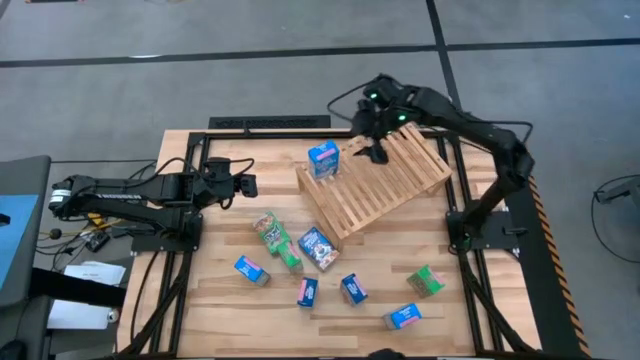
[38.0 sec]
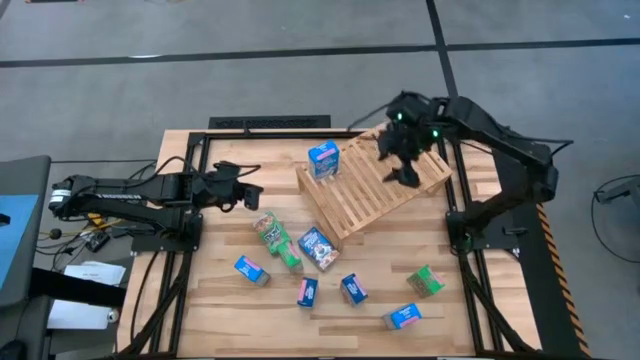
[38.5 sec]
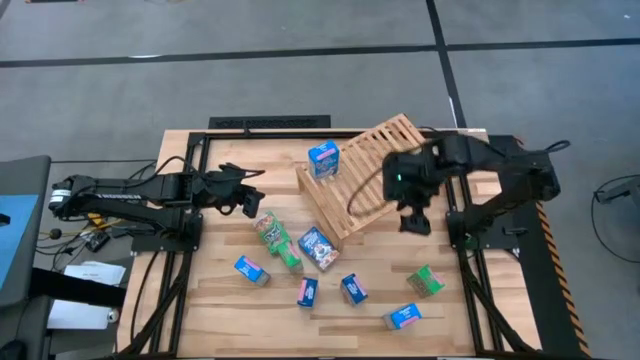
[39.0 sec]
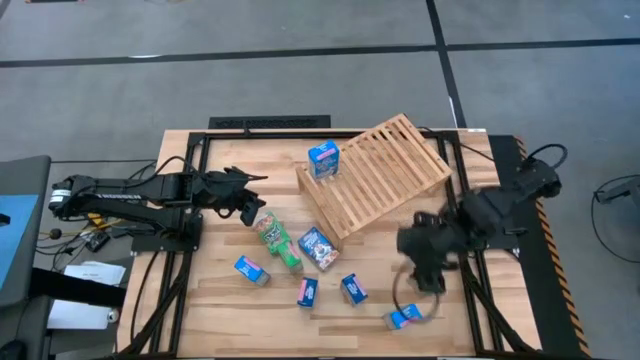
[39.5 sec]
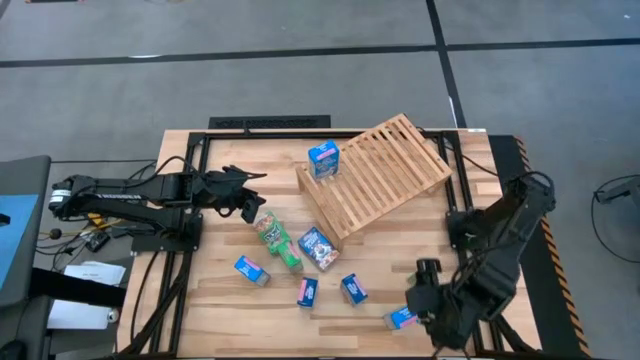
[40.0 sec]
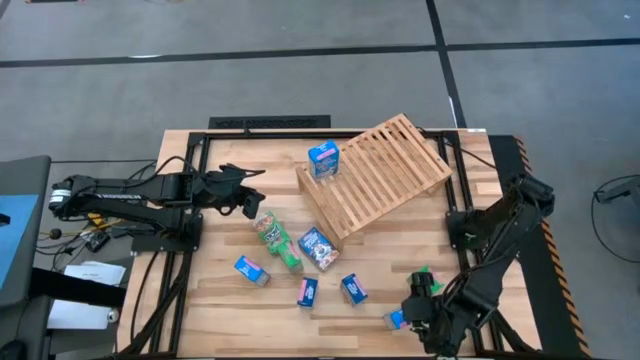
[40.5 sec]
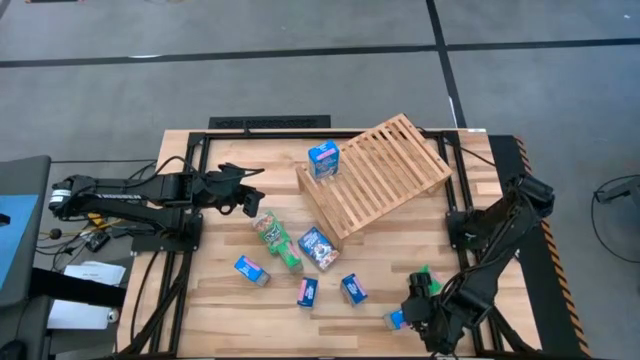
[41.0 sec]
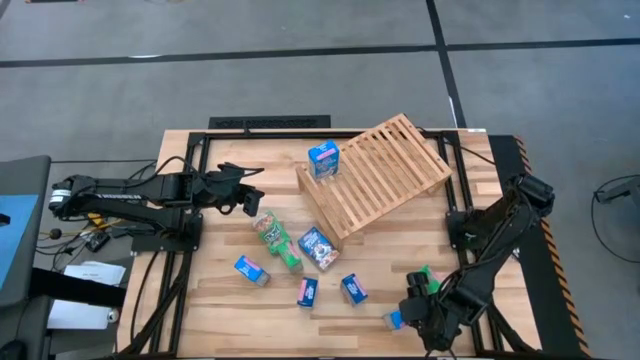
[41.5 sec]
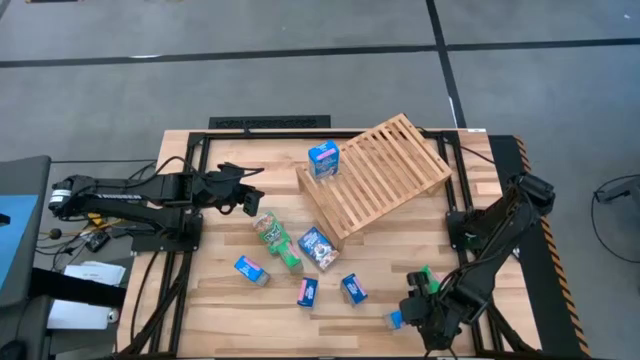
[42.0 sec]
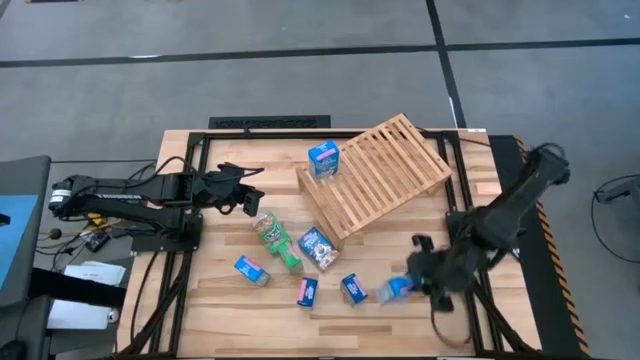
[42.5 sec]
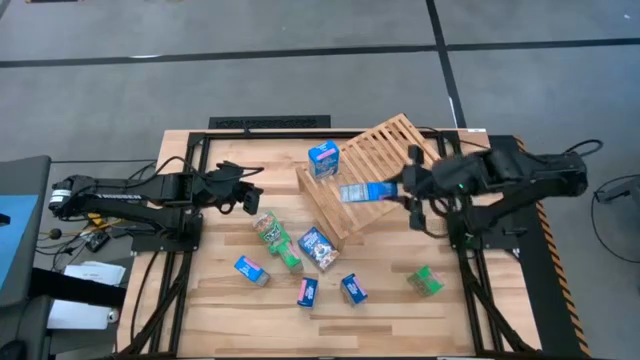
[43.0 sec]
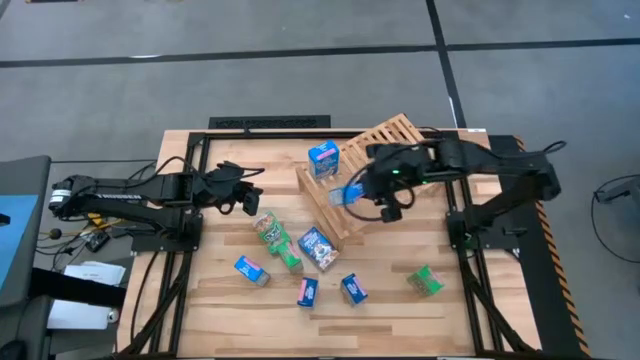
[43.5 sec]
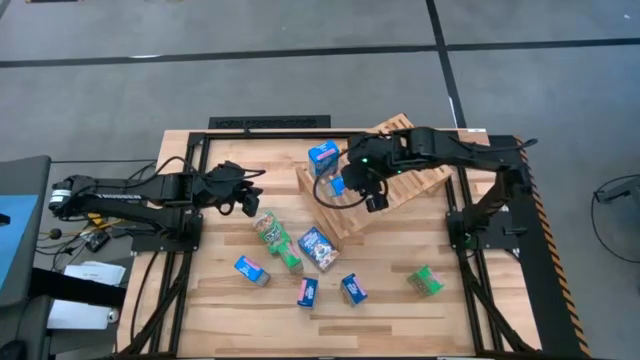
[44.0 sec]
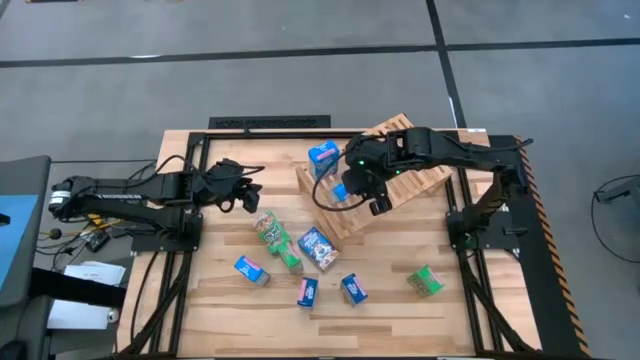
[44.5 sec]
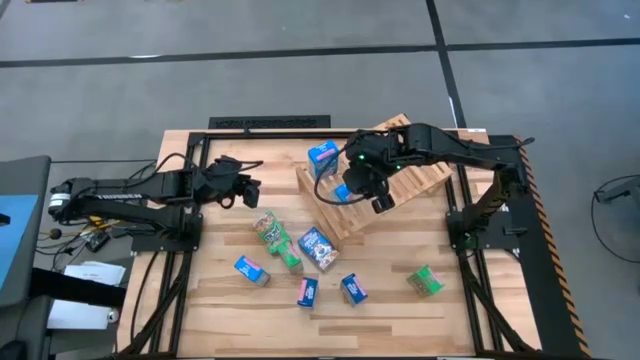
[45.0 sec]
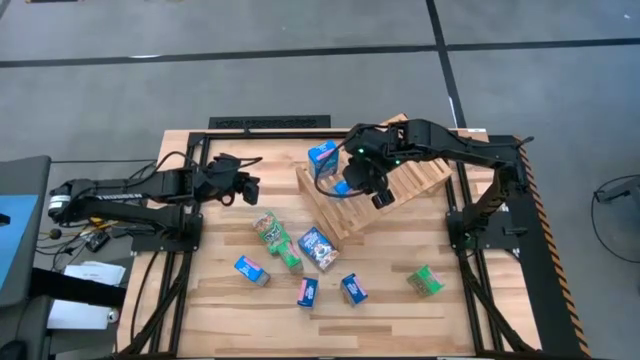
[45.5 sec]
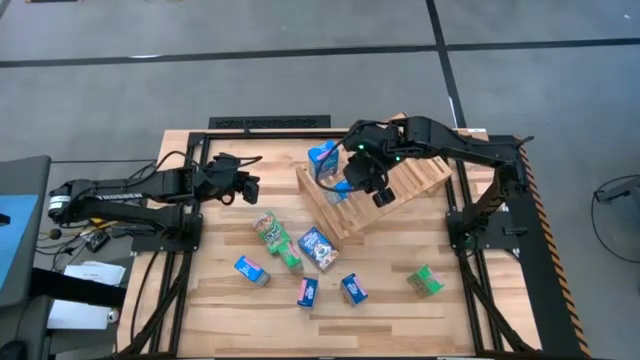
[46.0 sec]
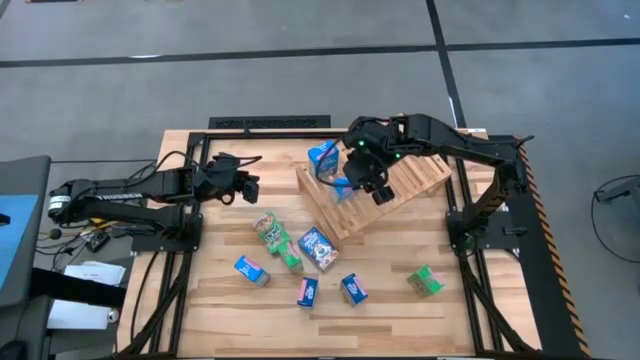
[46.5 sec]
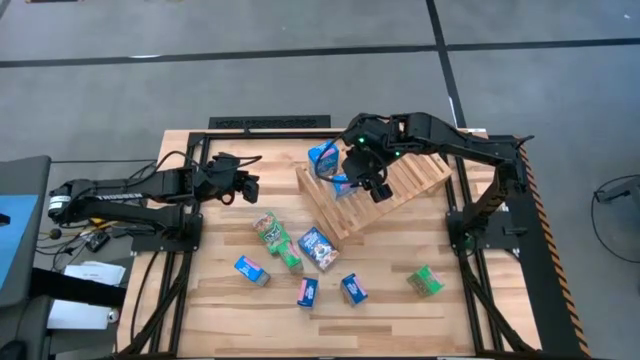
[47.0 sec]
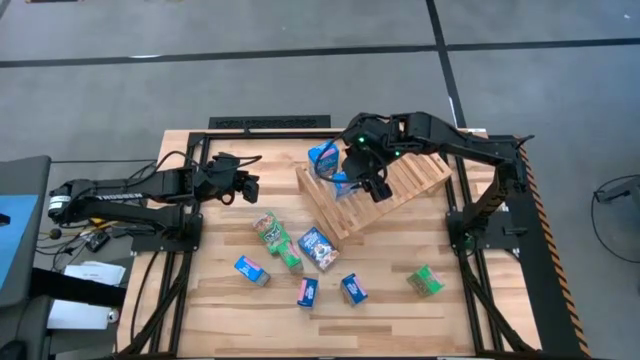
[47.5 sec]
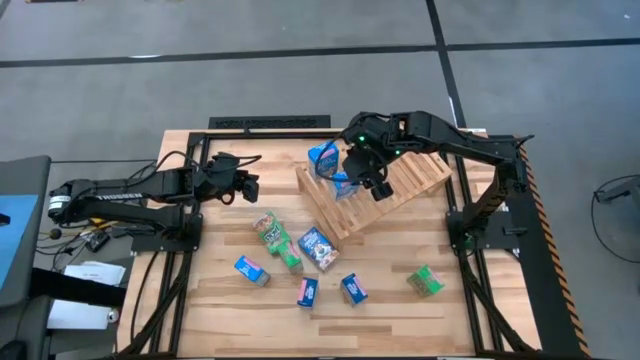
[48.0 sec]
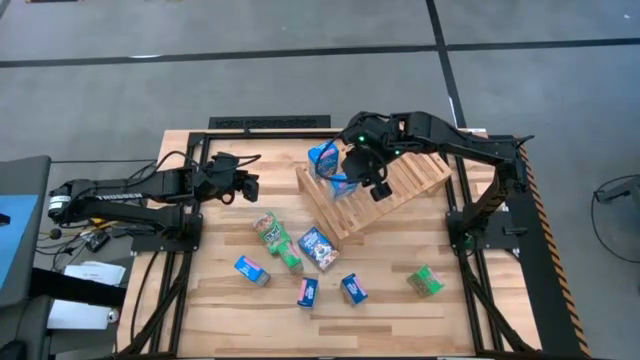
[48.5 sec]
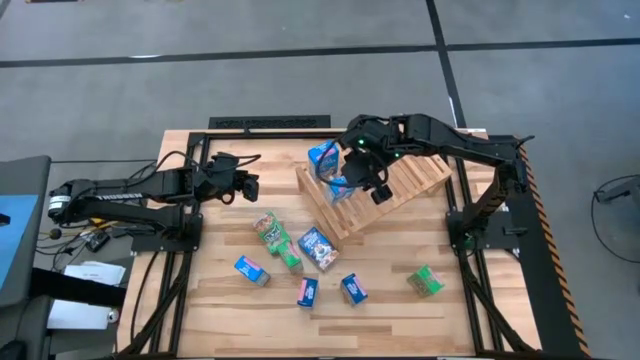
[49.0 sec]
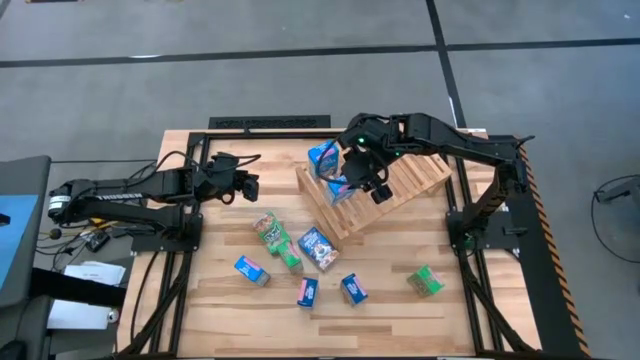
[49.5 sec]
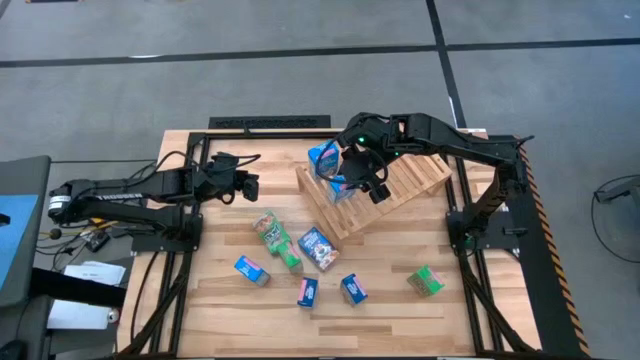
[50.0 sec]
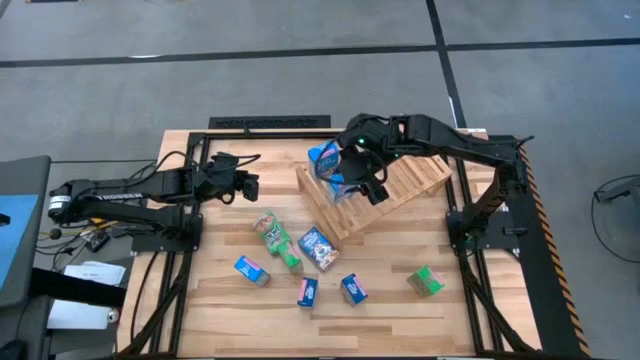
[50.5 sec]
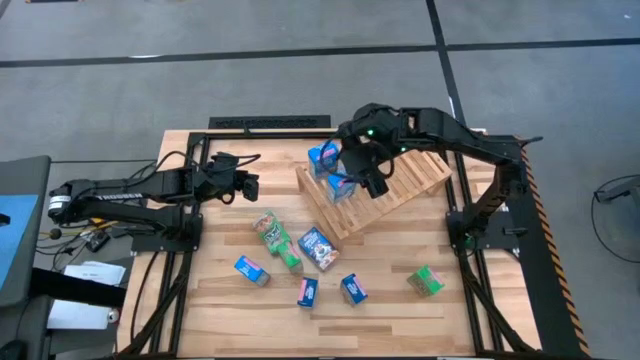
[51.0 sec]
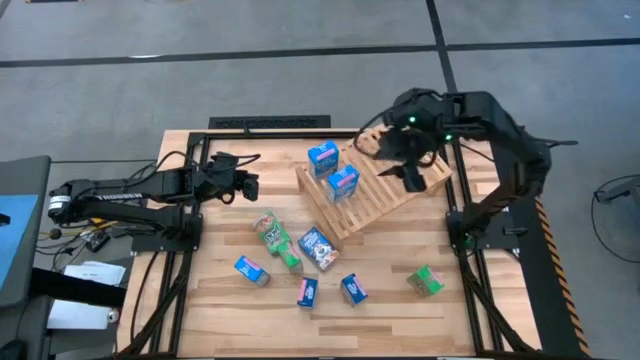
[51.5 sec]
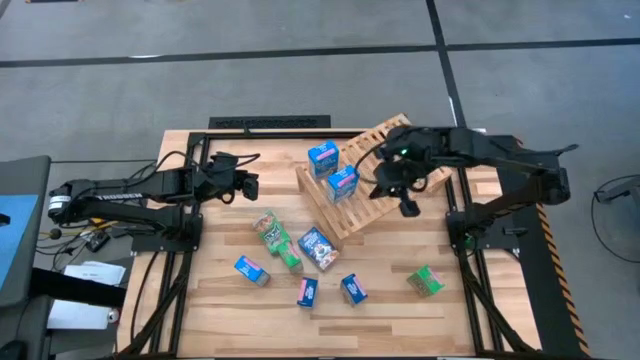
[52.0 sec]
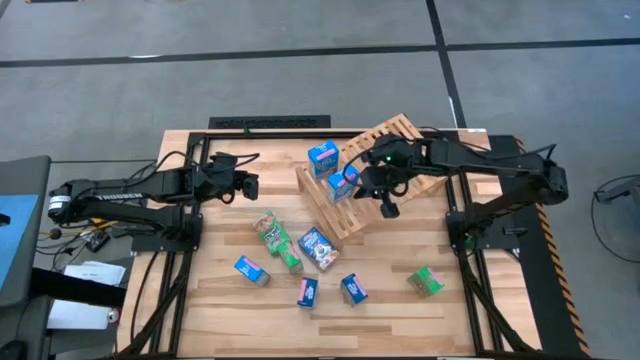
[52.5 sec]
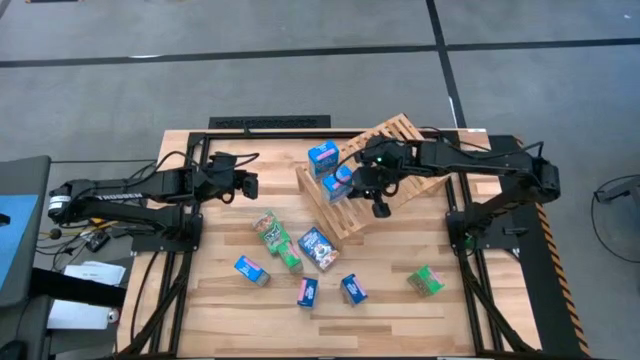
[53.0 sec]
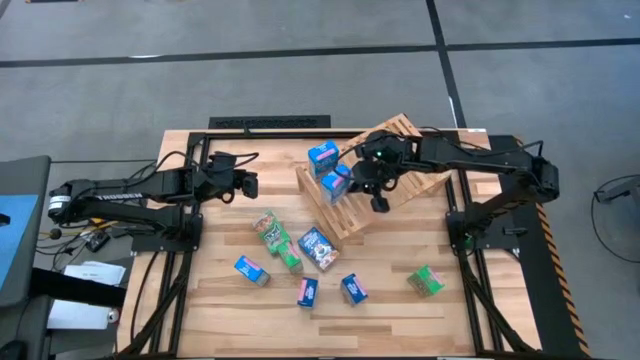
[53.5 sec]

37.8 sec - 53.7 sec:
Task: Stack cereal on shelf
Put the right light blue cereal box aligned with the other light blue cereal box on the shelf

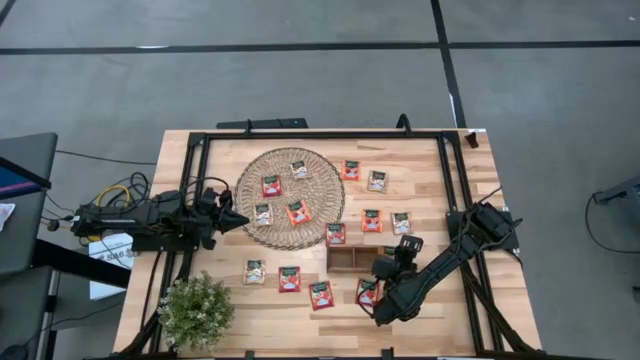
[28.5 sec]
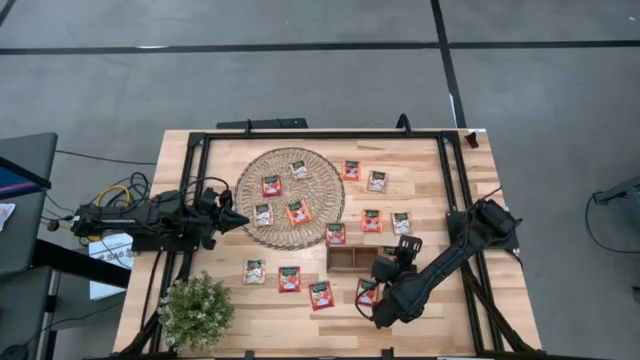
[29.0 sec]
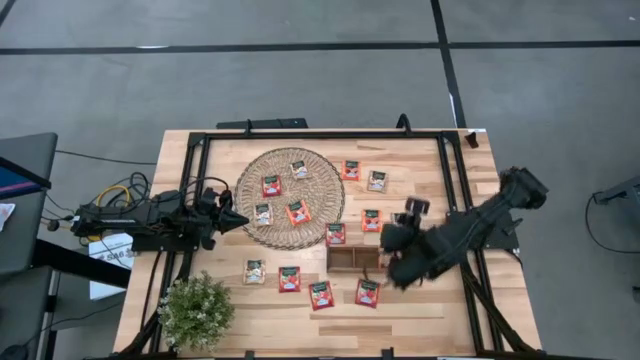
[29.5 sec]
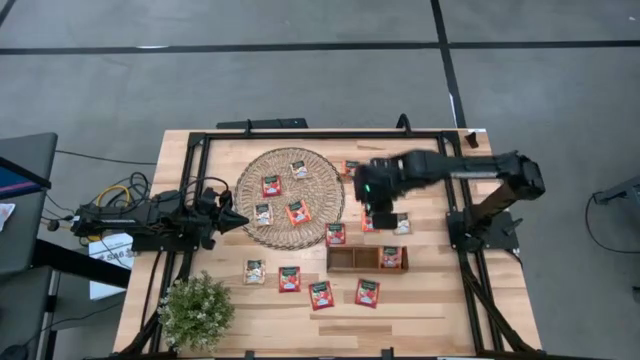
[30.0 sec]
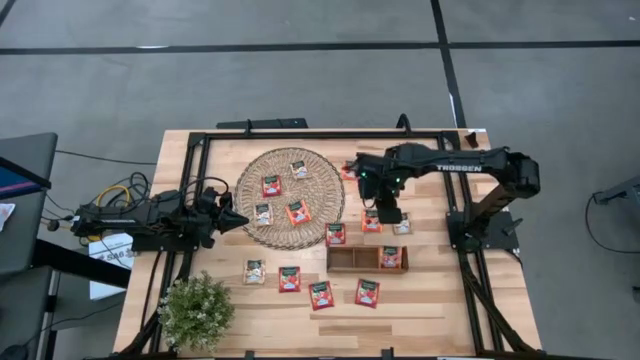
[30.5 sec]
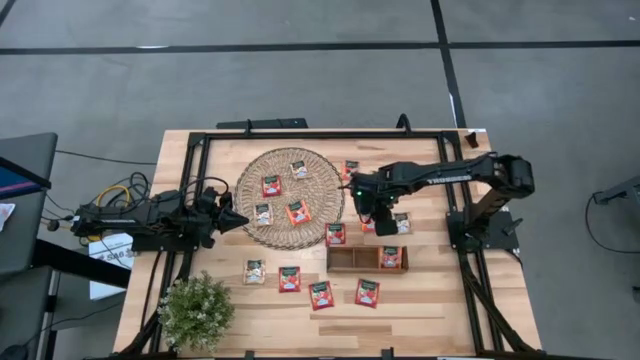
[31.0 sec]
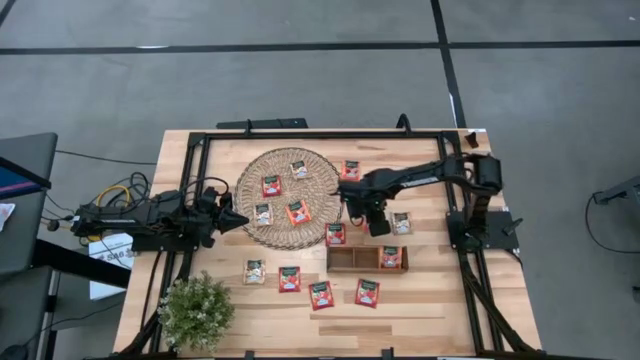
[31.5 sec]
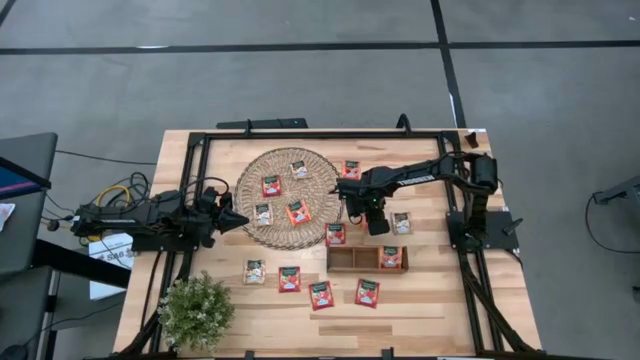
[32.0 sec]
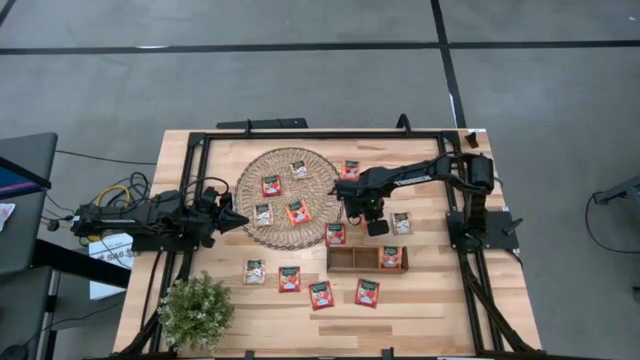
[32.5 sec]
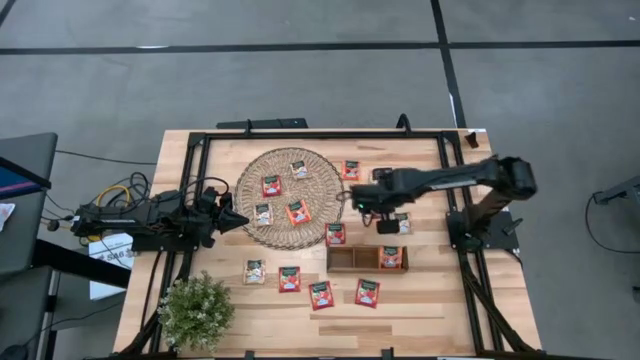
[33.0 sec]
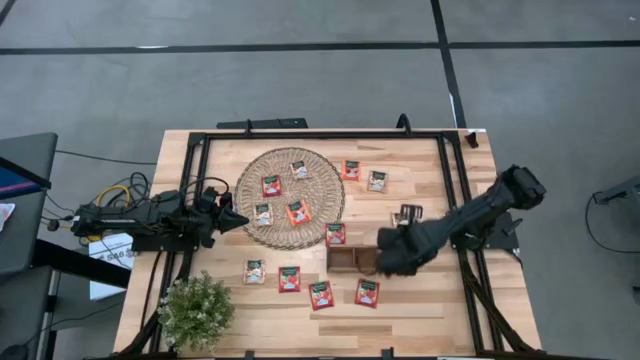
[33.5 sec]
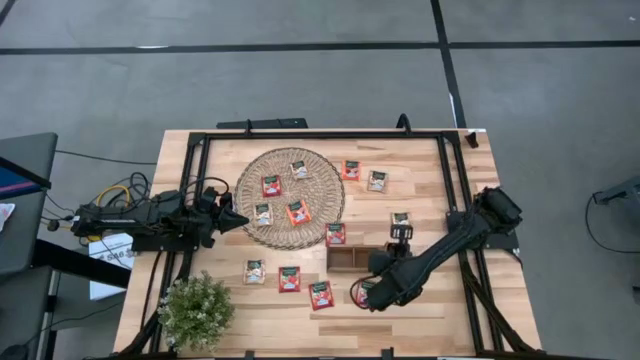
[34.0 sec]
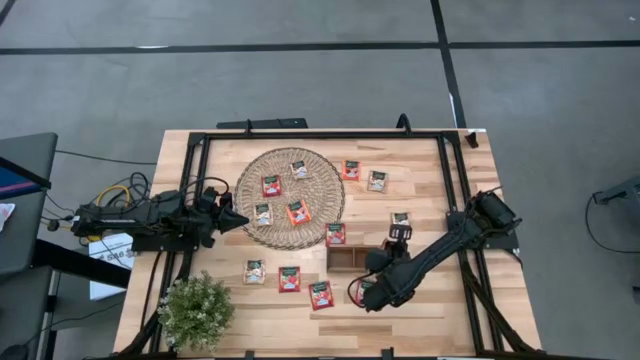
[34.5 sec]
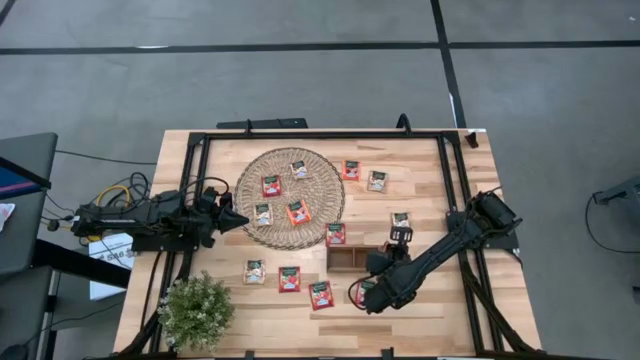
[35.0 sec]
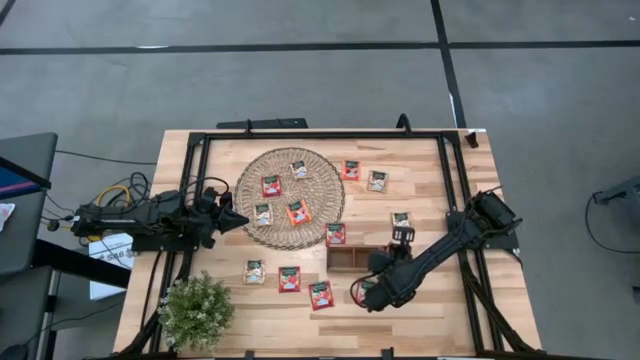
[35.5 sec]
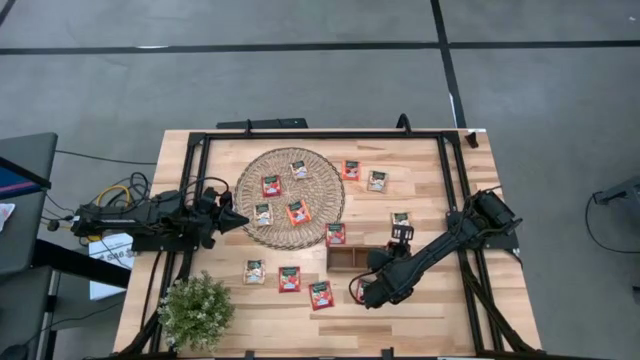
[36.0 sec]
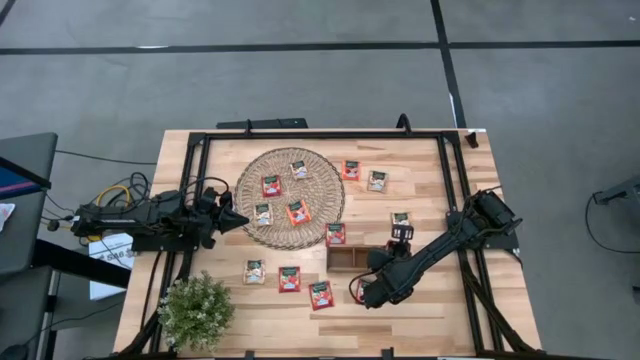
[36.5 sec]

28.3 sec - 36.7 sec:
Task: Pick & Place Tea
Put the orange tea bag into the right section of the wooden organizer
